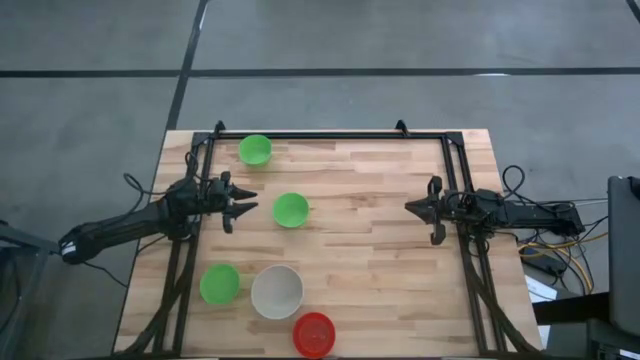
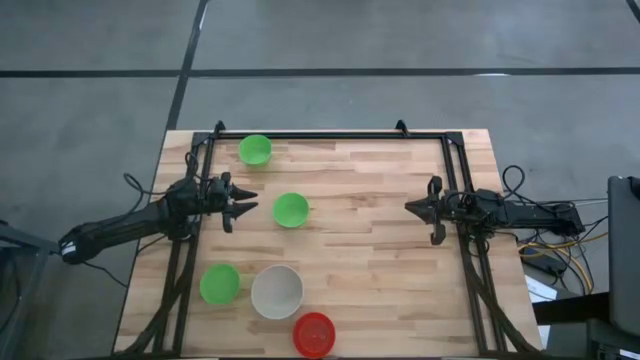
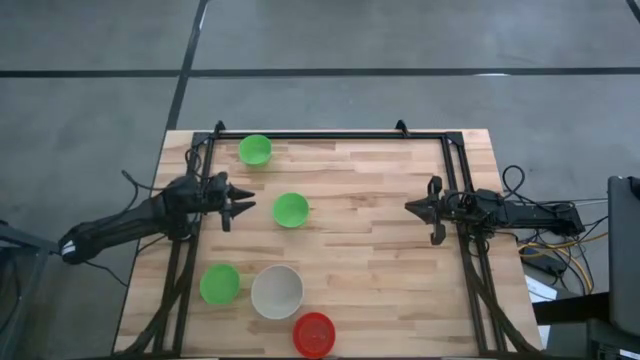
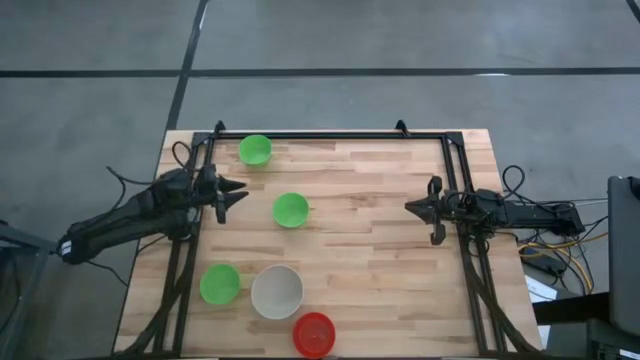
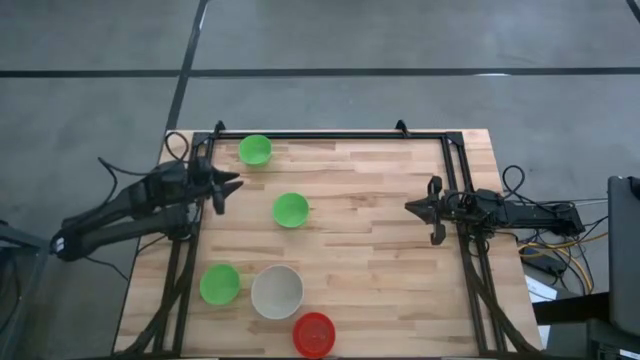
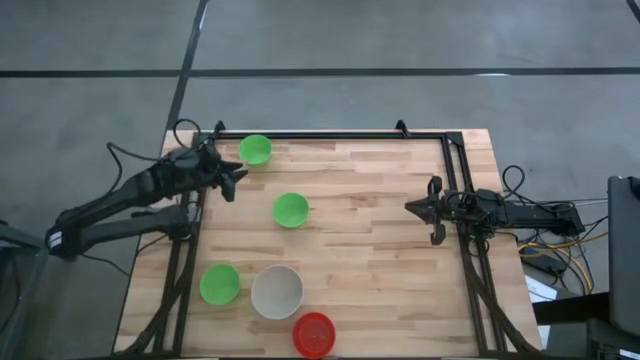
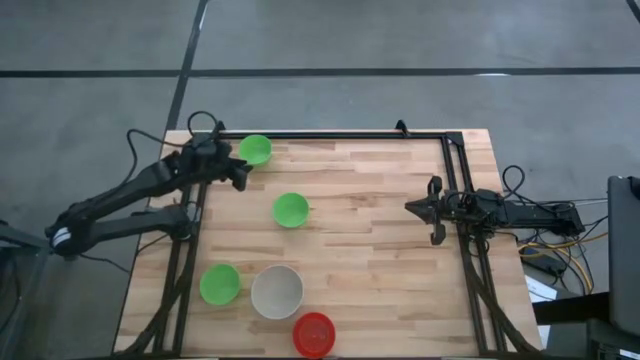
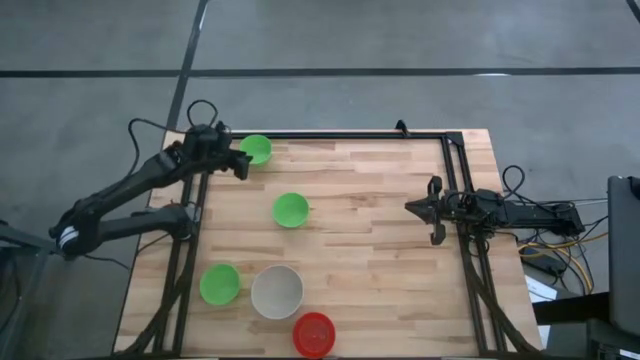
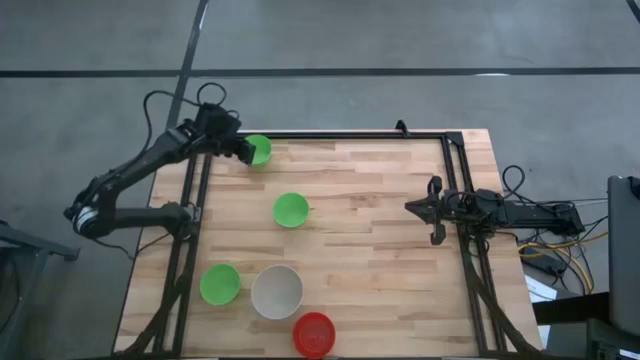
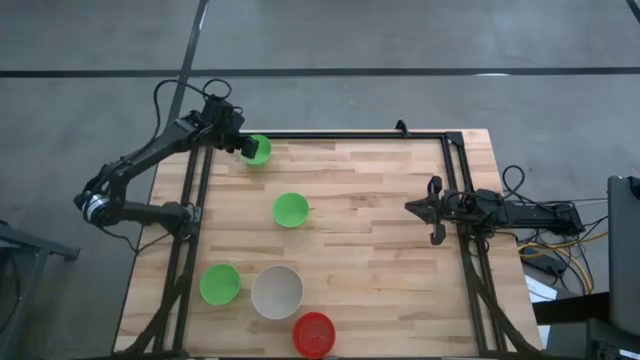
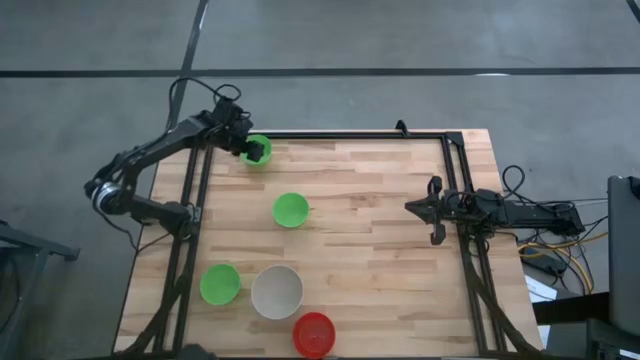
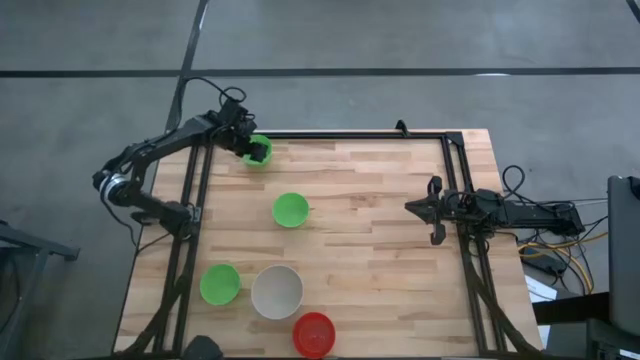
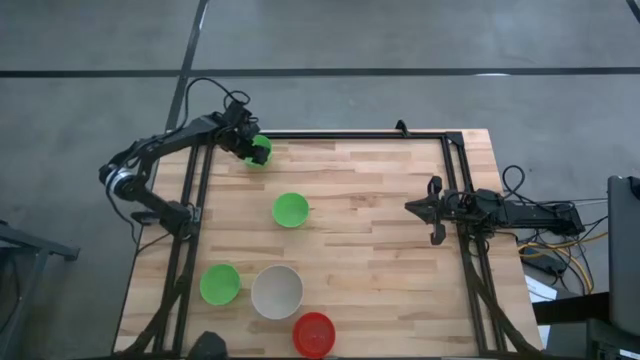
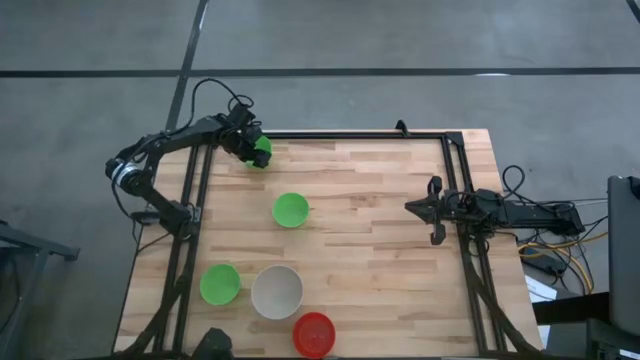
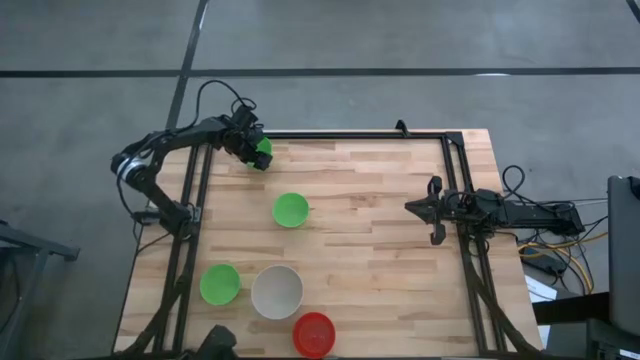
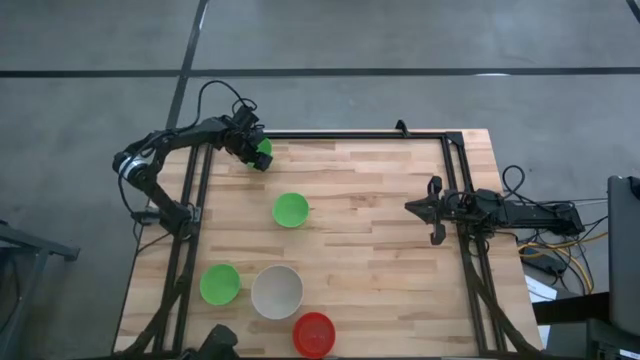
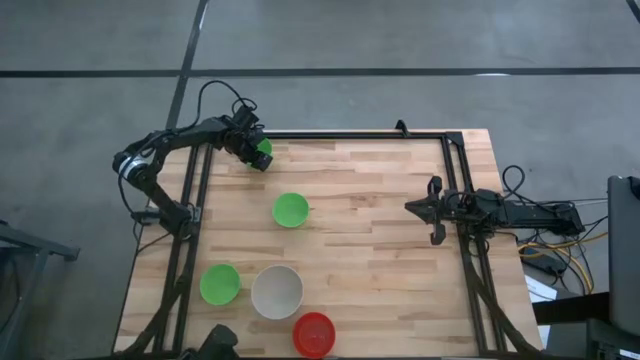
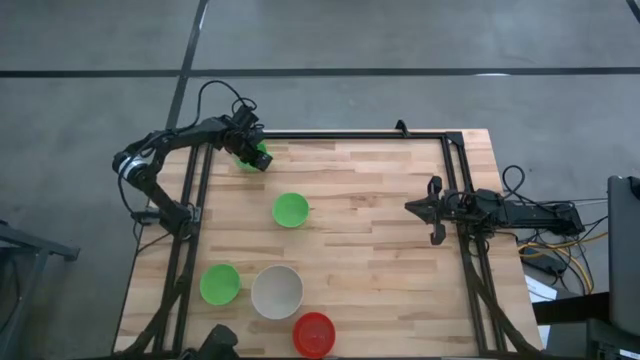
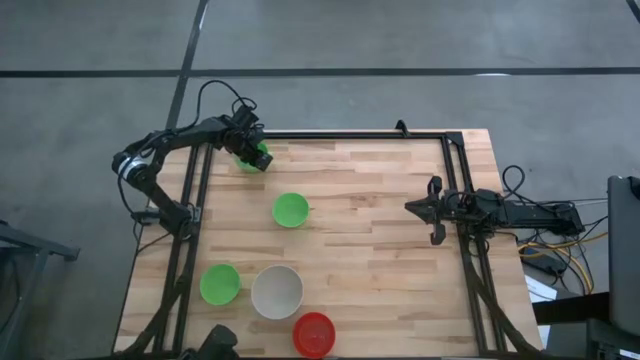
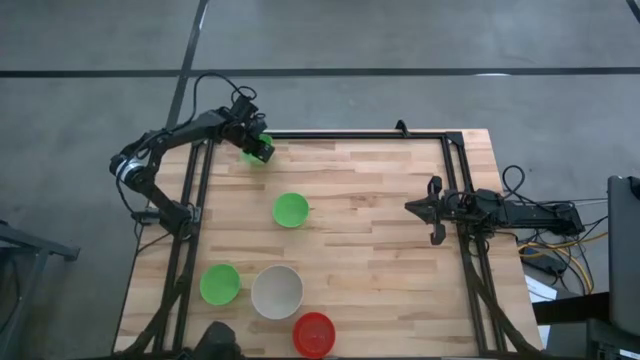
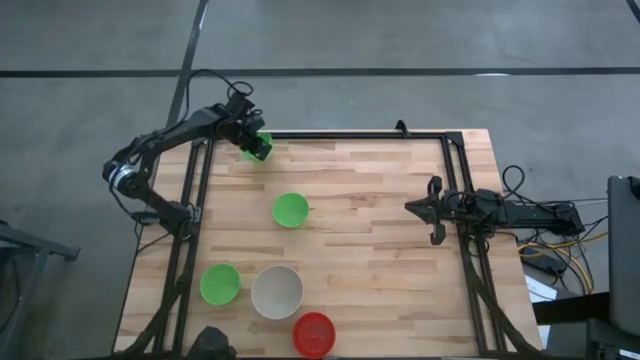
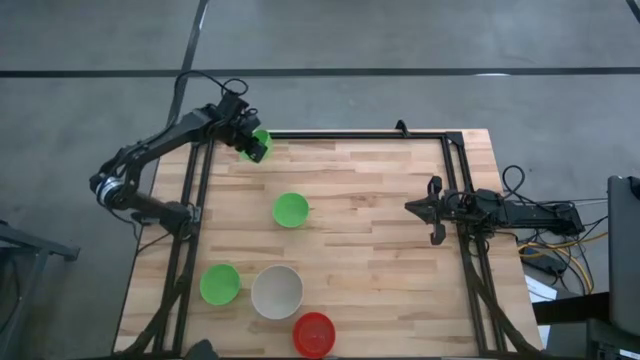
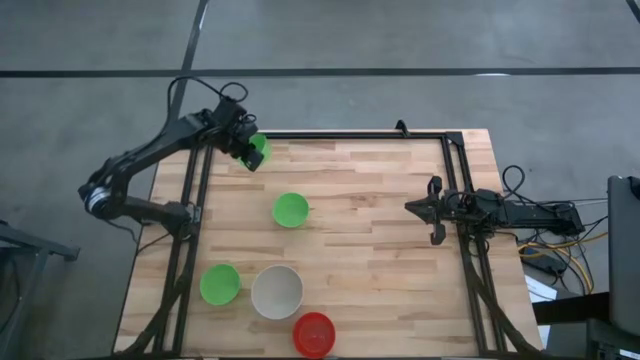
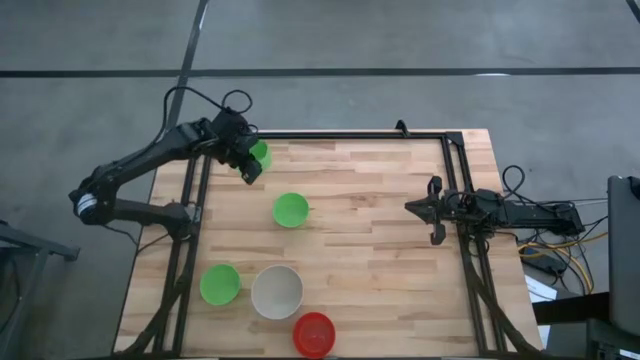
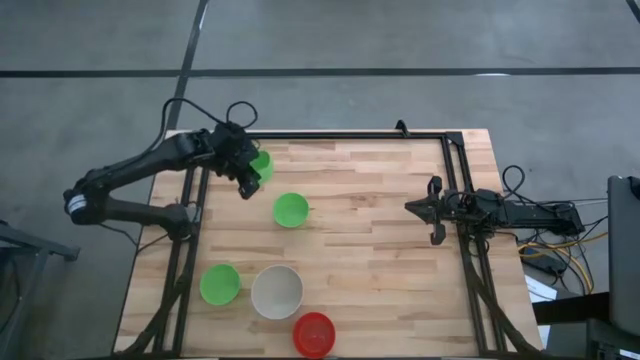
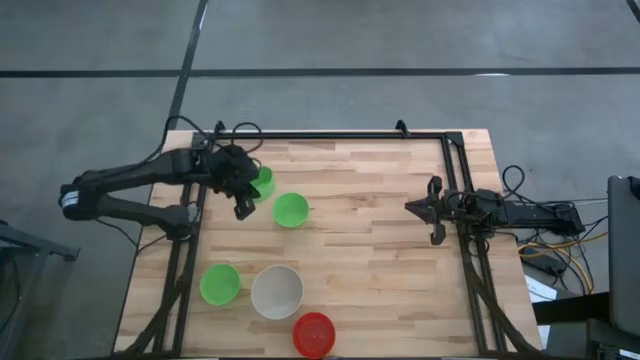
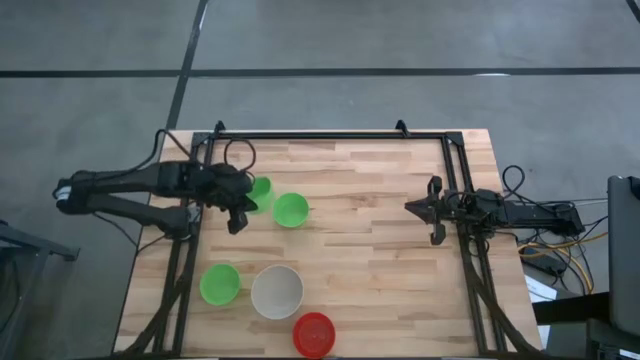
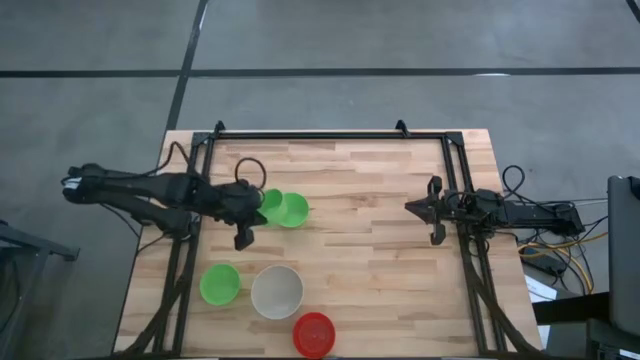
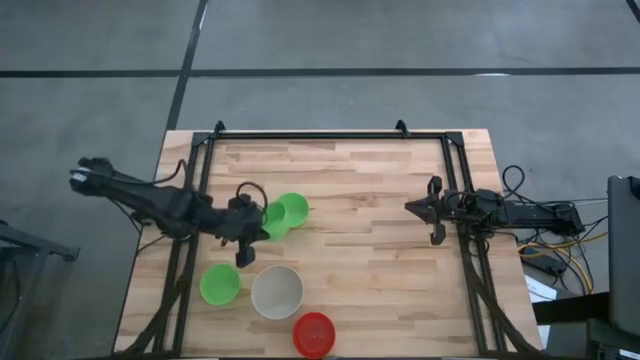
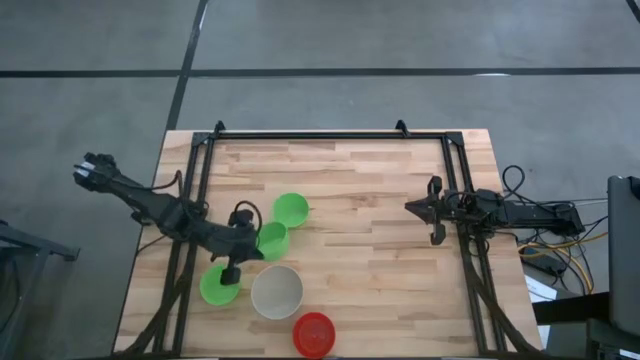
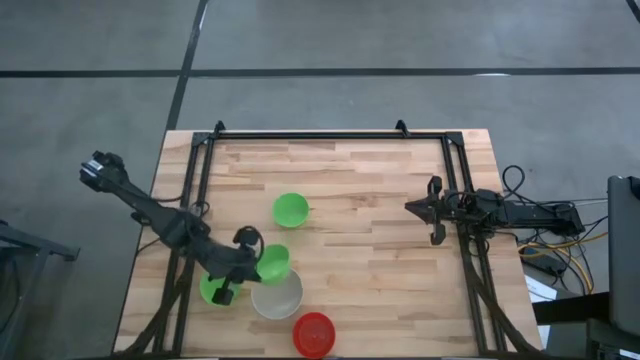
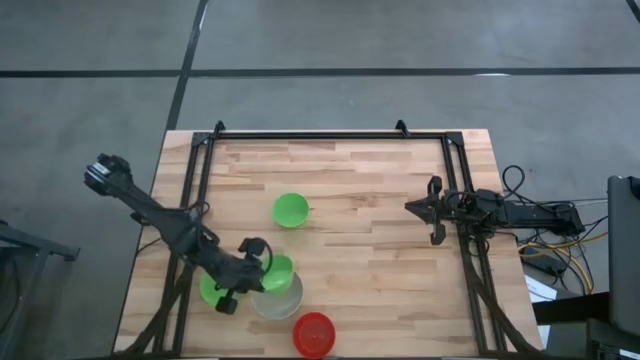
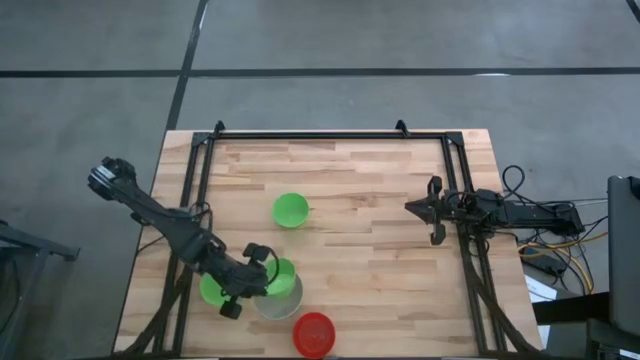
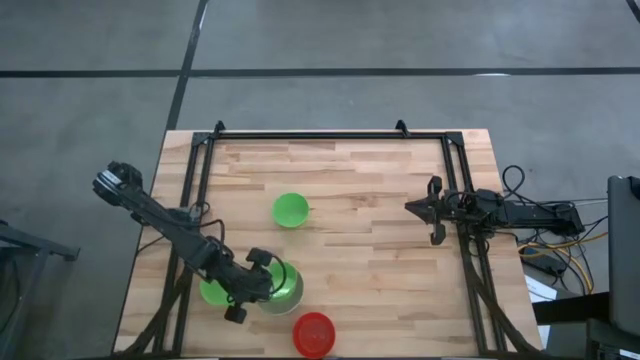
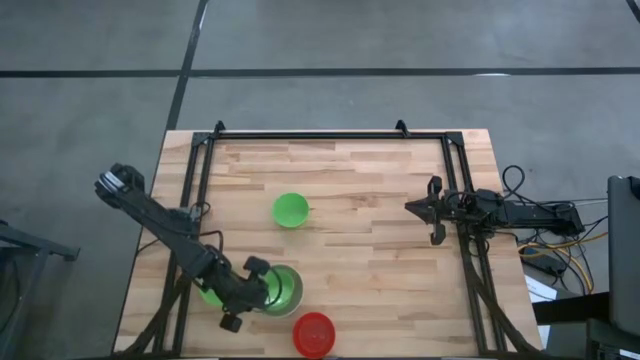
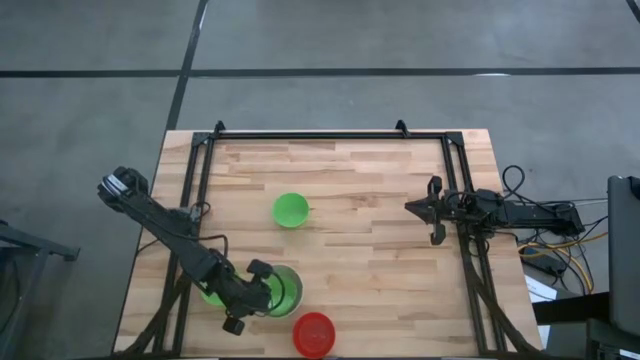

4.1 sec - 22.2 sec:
Stack the top green bowl on the white bowl
